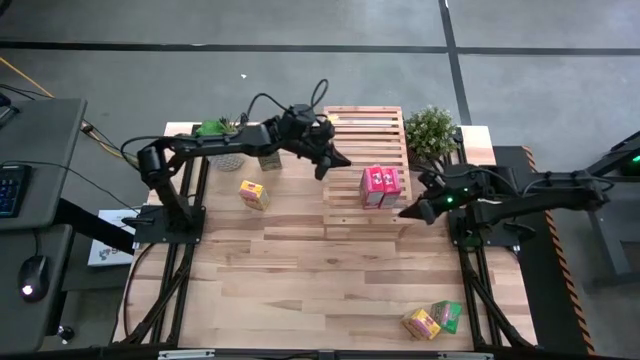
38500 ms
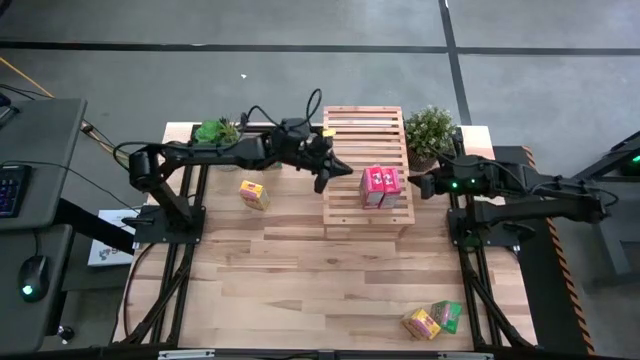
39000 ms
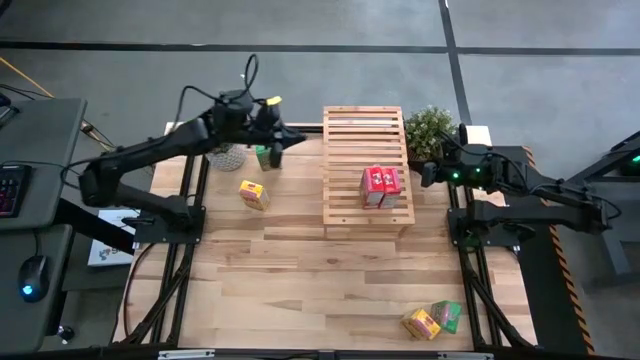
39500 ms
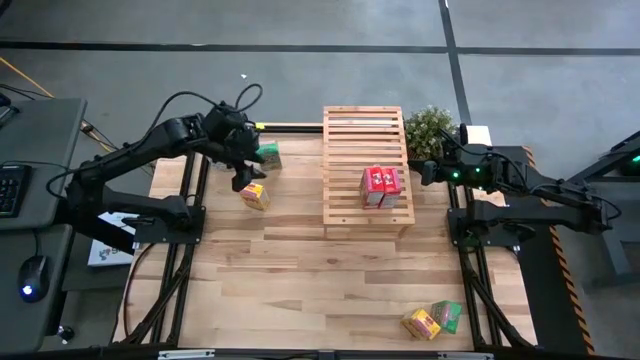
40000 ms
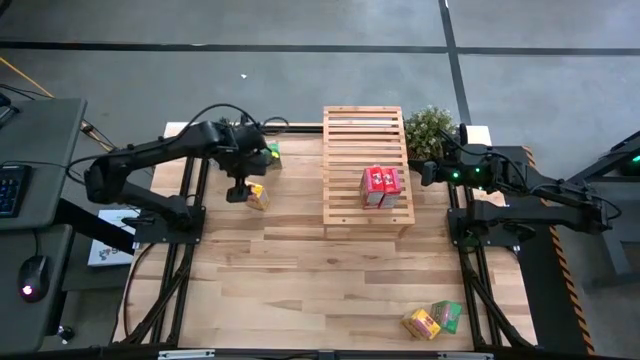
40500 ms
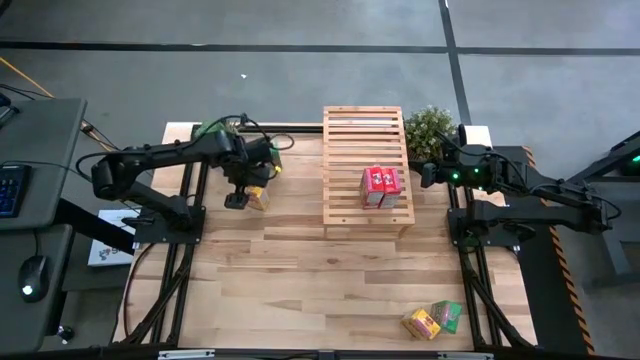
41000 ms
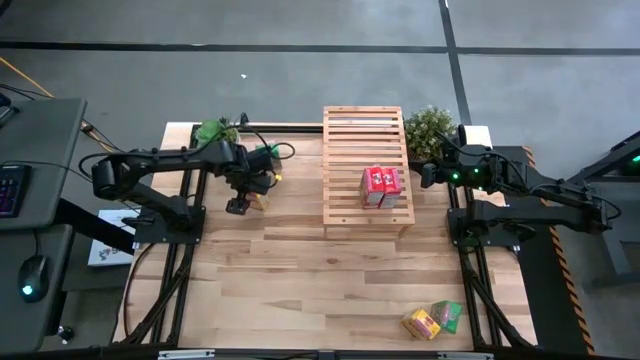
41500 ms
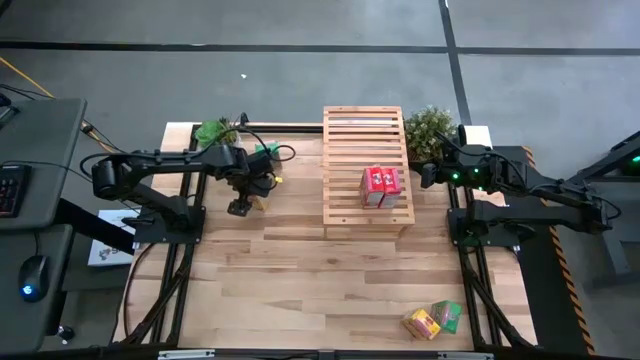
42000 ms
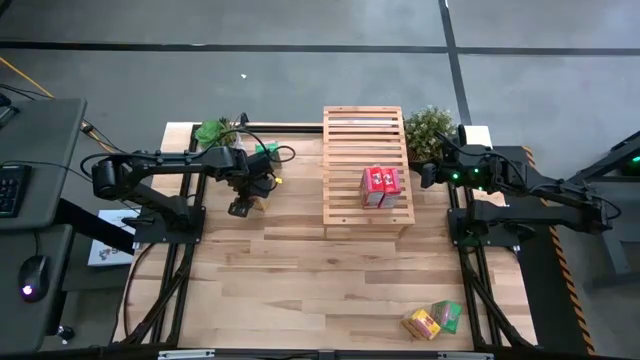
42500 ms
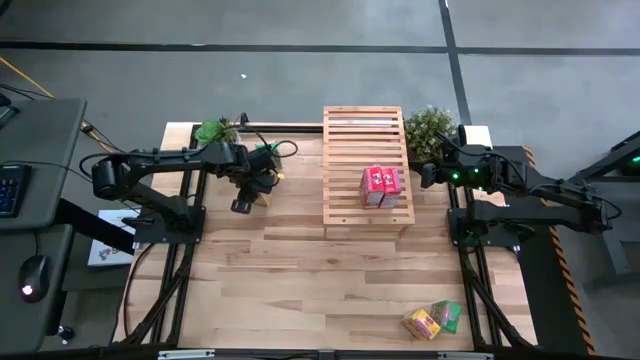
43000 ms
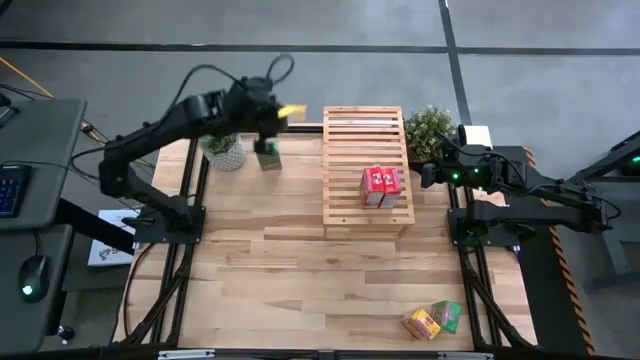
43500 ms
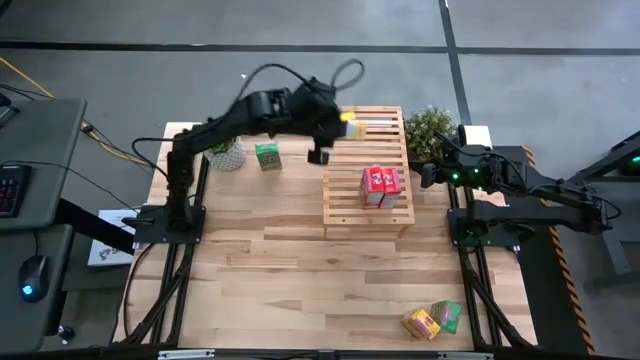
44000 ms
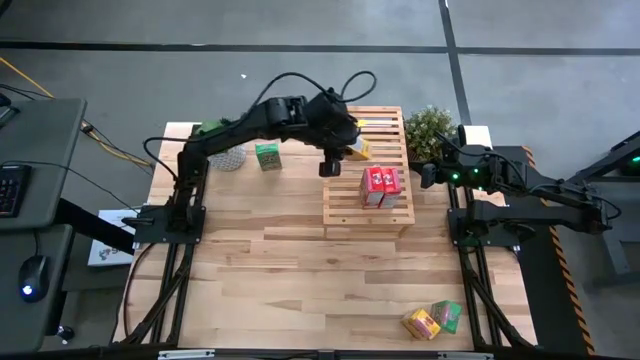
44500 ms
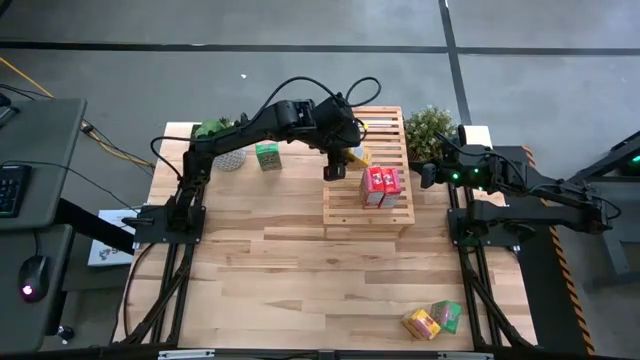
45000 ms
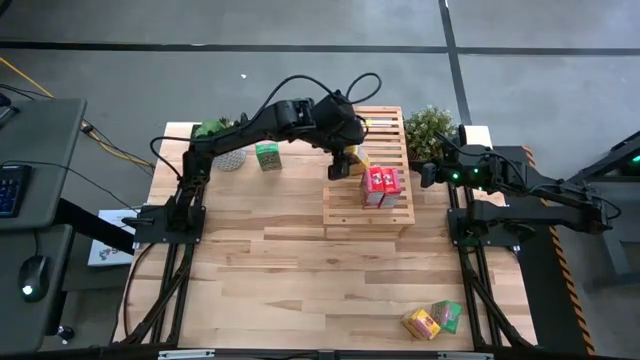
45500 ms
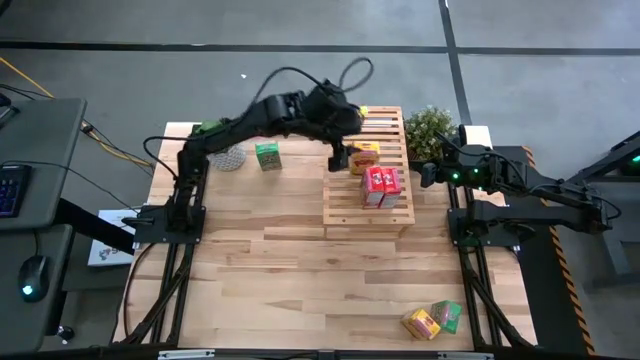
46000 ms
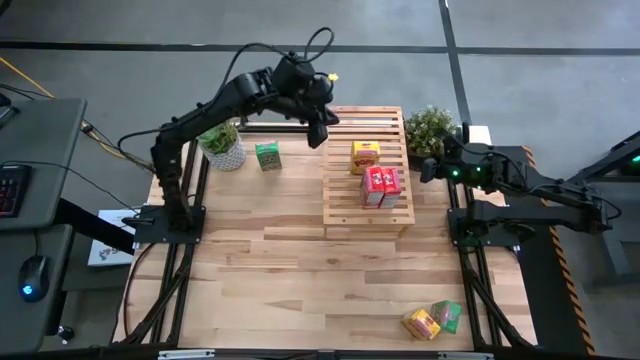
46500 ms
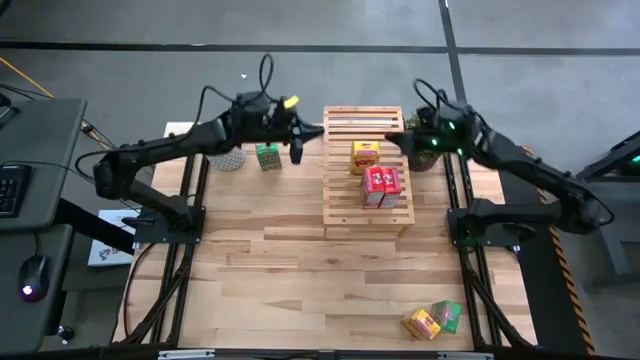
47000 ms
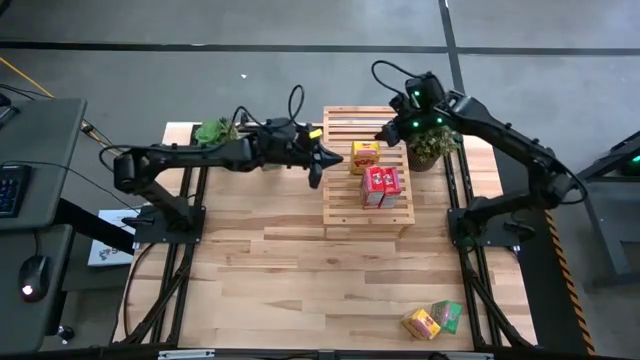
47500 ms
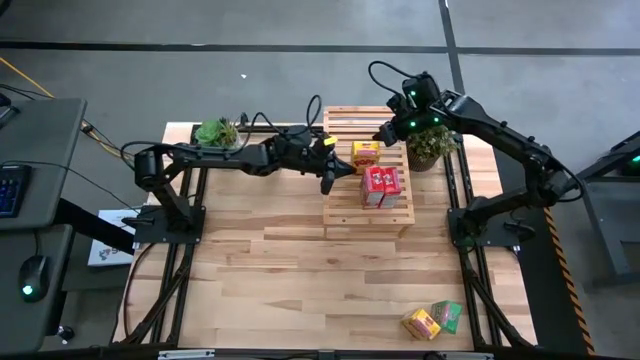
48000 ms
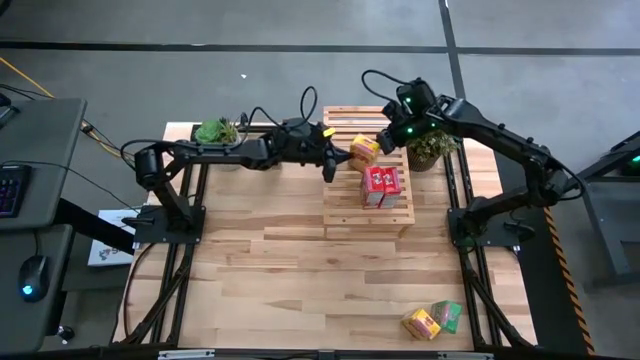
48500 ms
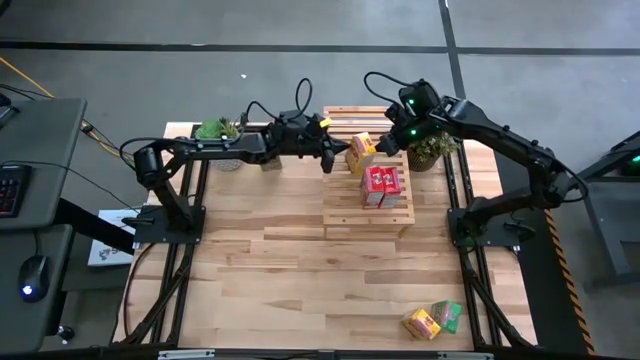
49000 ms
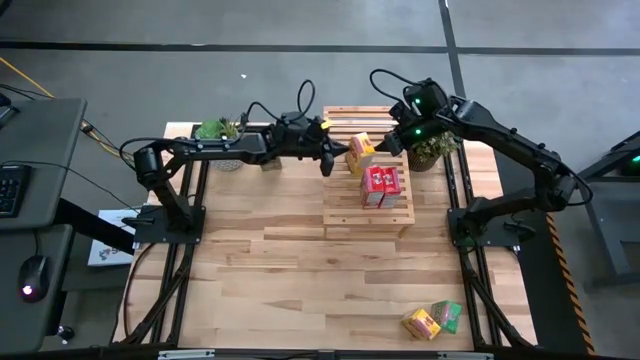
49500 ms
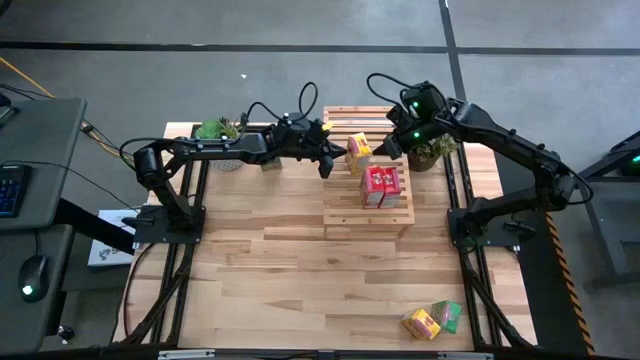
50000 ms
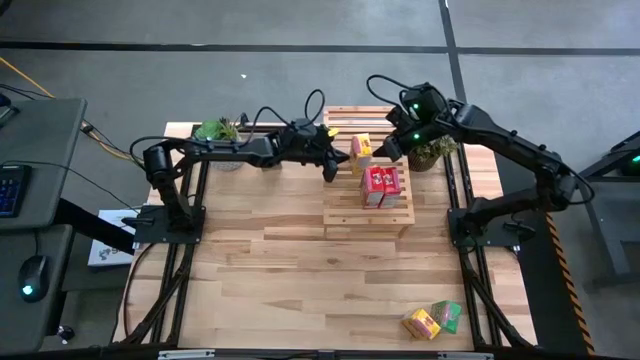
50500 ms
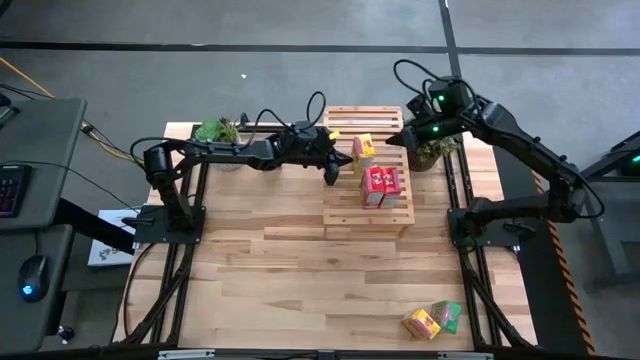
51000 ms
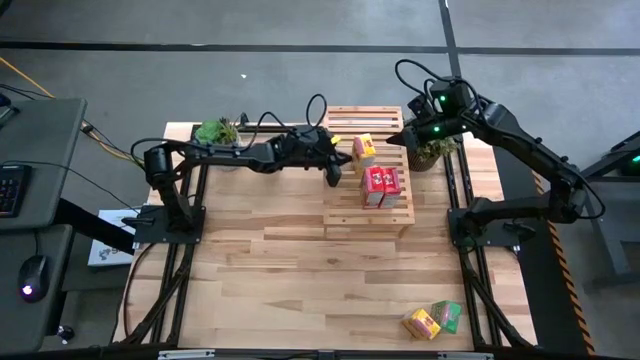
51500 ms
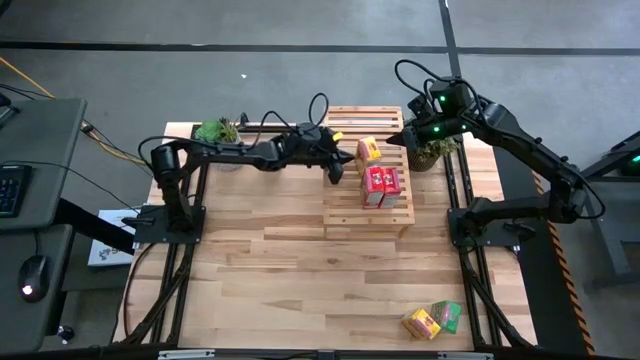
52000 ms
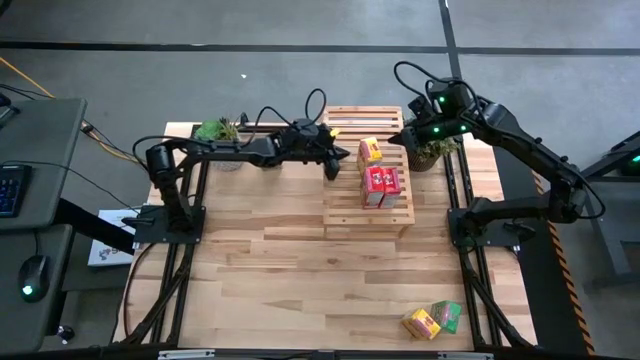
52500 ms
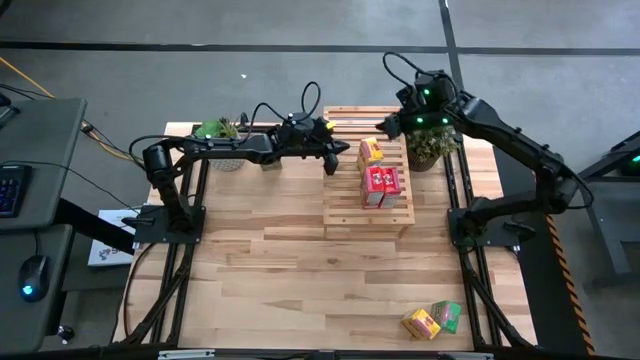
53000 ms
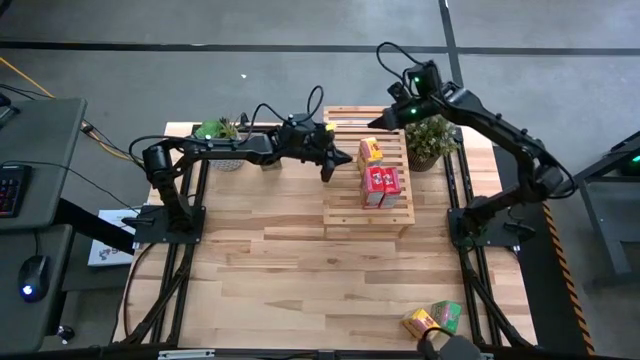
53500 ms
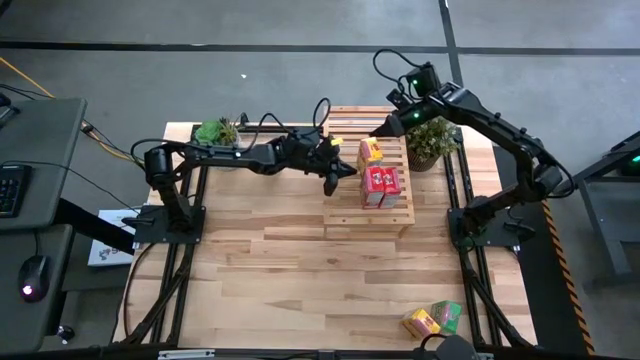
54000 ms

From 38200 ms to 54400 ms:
Task: Stack cereal on shelf
Put the top yellow cereal box on the shelf

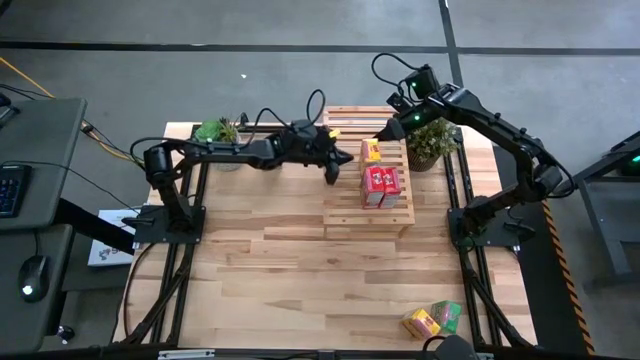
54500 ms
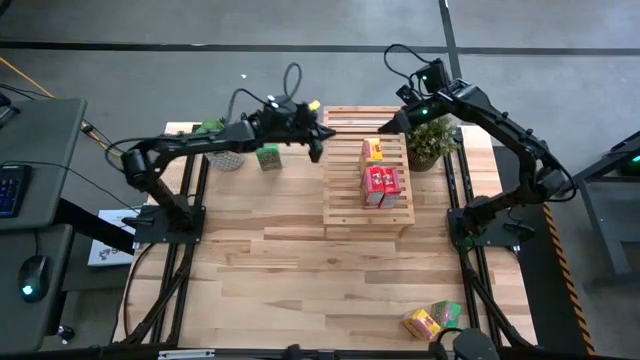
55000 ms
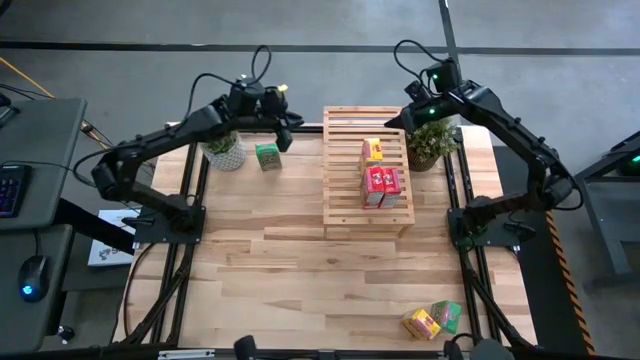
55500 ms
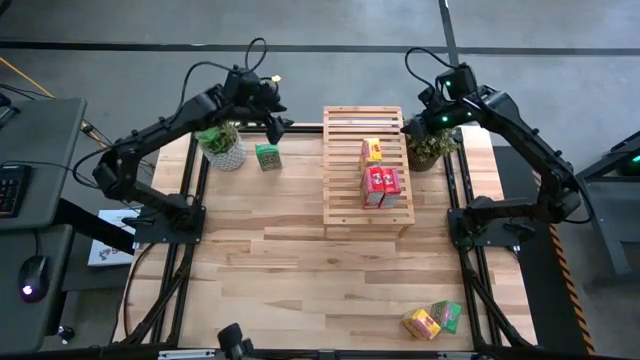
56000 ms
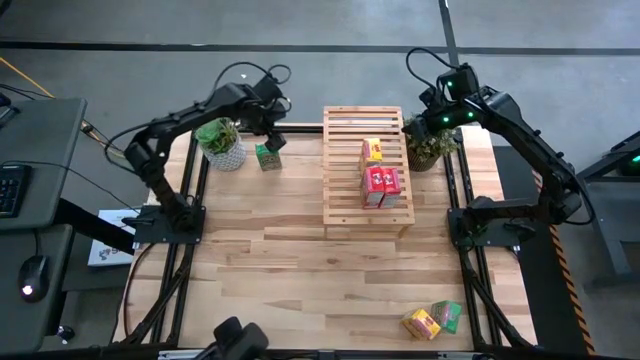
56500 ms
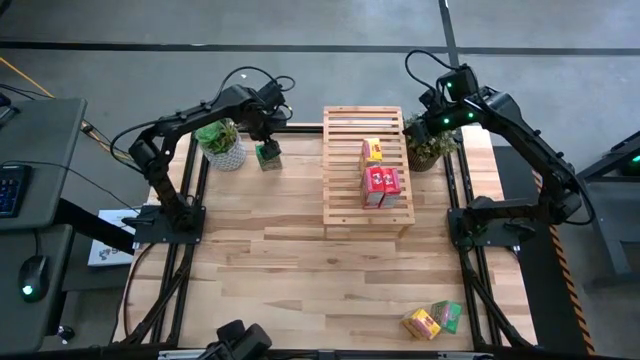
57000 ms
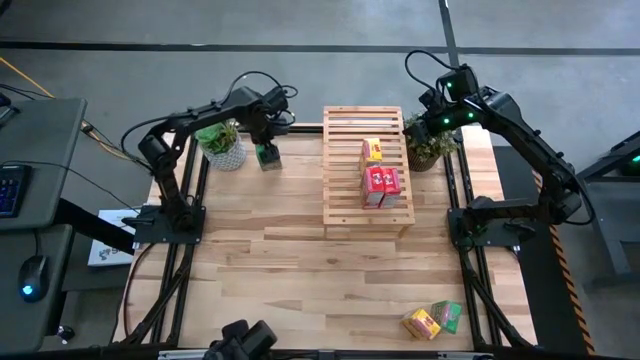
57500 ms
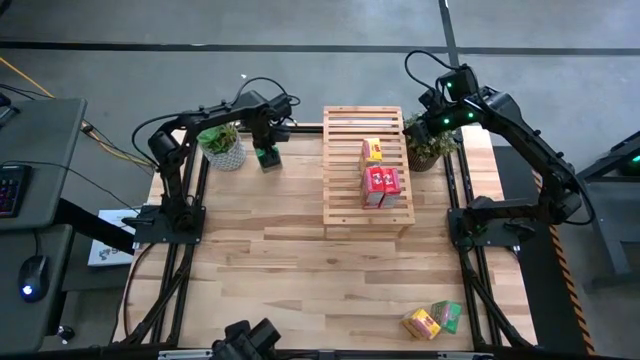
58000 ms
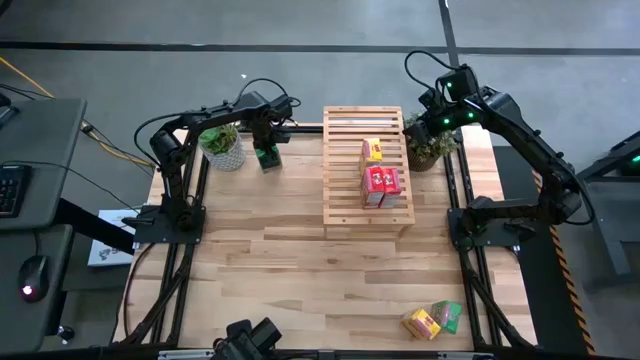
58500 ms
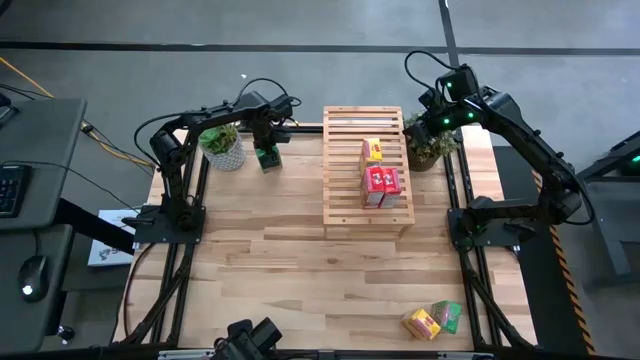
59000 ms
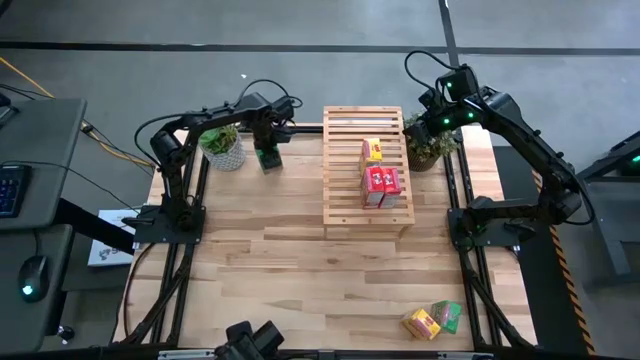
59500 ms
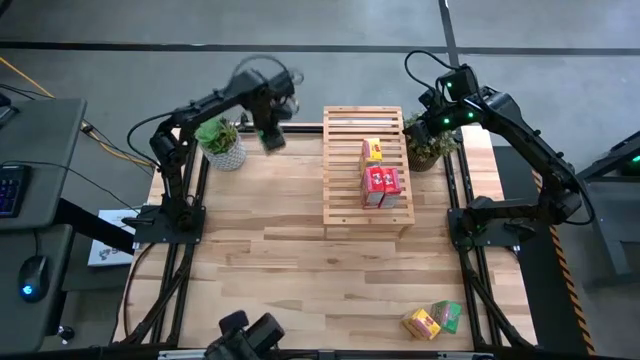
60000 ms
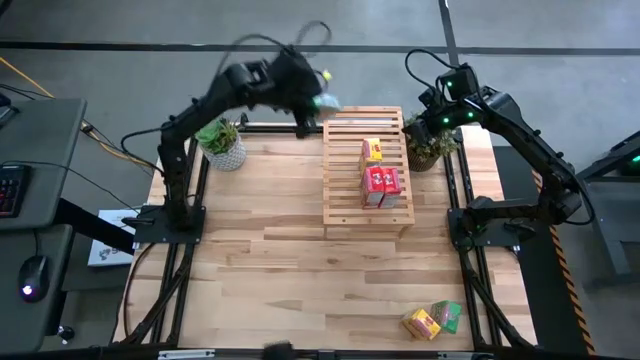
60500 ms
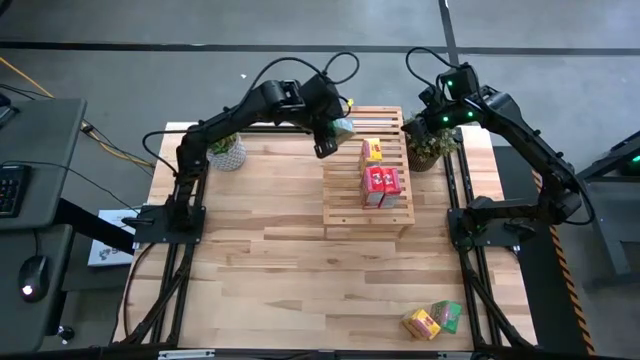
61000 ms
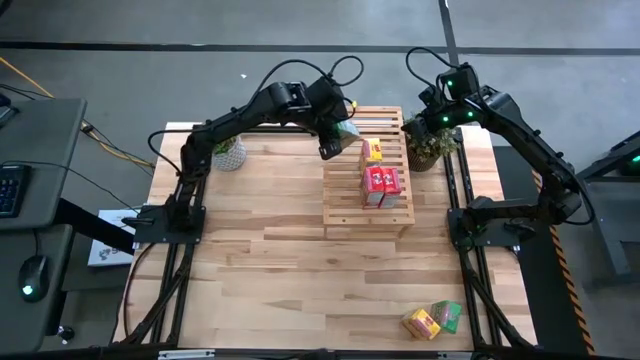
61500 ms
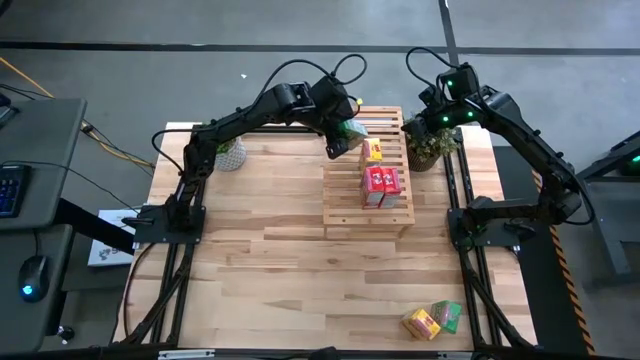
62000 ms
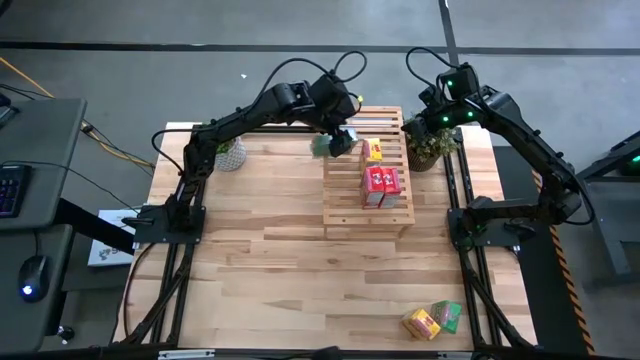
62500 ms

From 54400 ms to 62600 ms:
Put the top green cereal box on the shelf
